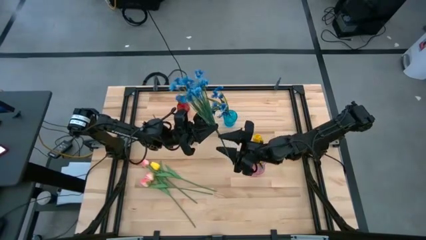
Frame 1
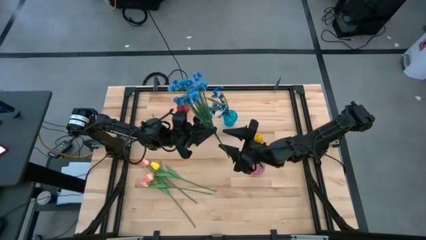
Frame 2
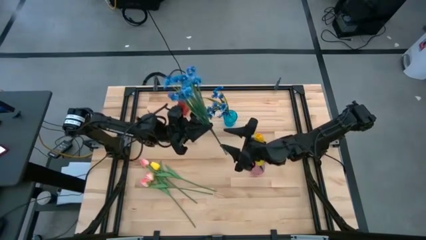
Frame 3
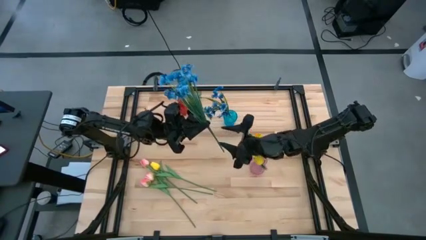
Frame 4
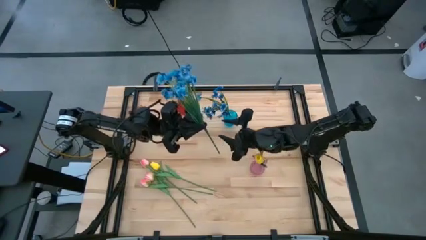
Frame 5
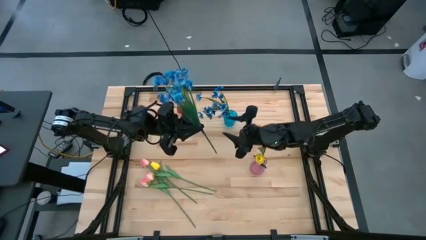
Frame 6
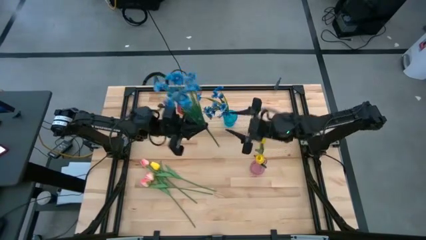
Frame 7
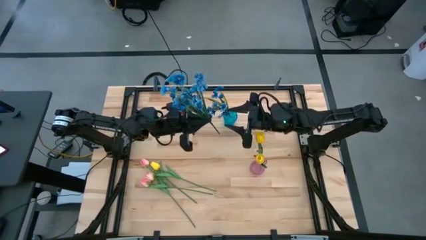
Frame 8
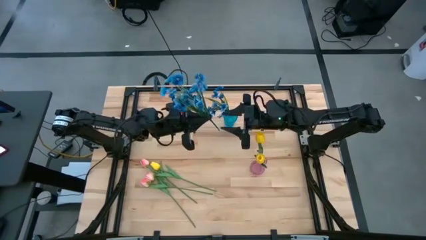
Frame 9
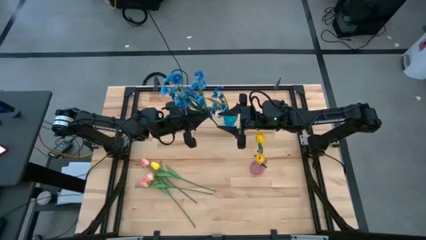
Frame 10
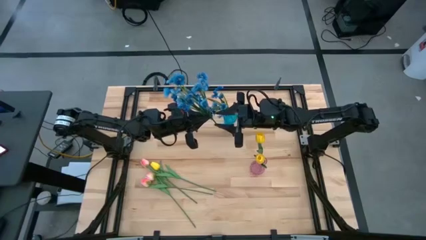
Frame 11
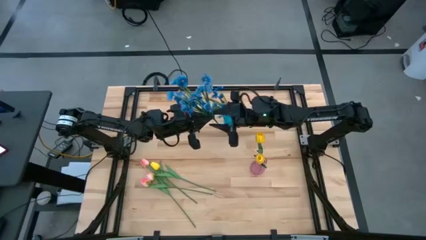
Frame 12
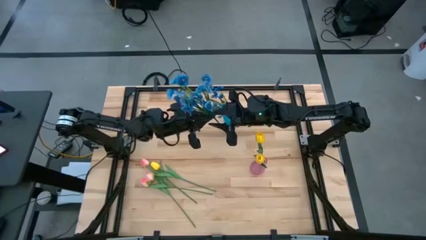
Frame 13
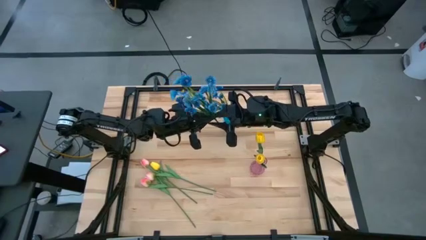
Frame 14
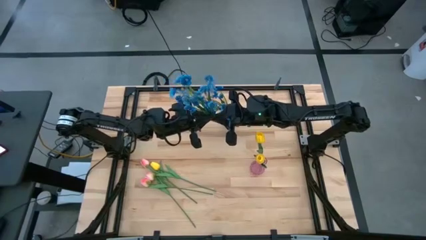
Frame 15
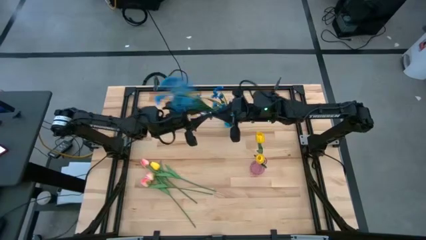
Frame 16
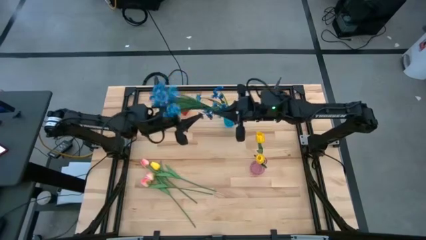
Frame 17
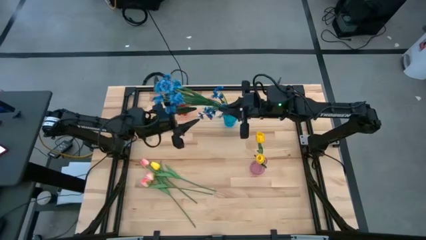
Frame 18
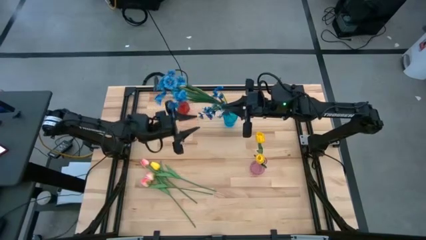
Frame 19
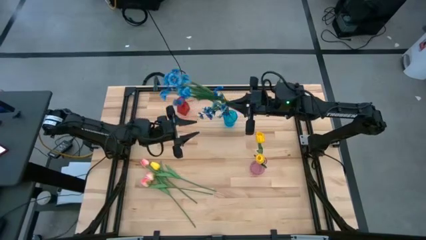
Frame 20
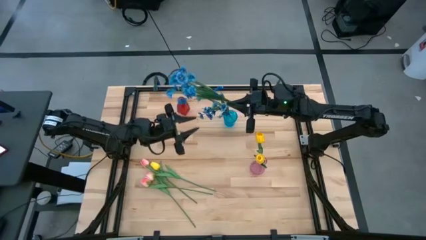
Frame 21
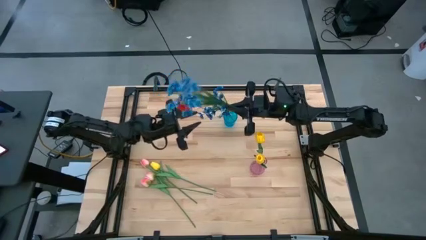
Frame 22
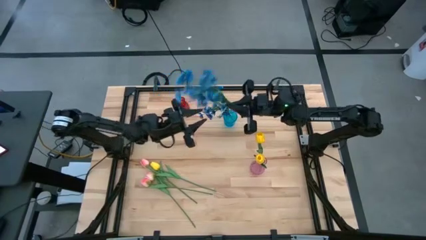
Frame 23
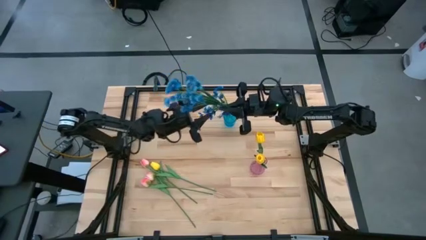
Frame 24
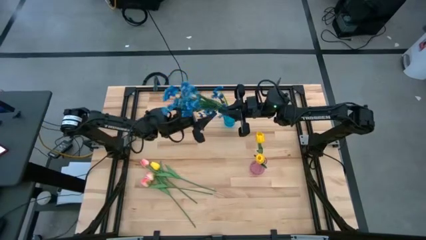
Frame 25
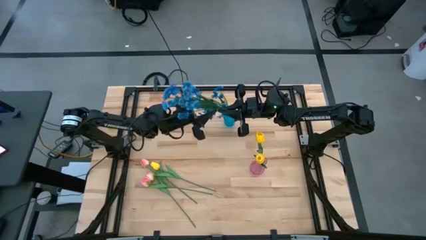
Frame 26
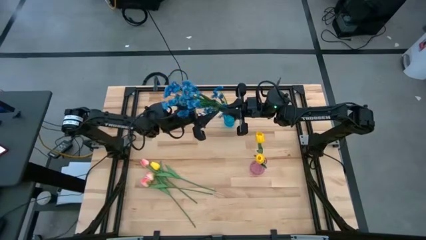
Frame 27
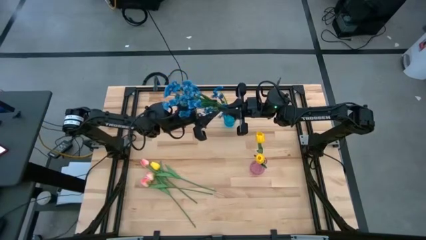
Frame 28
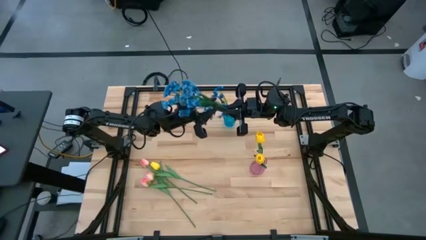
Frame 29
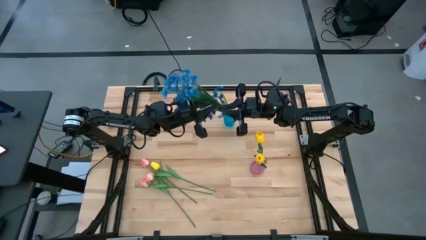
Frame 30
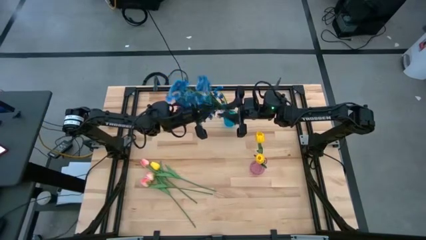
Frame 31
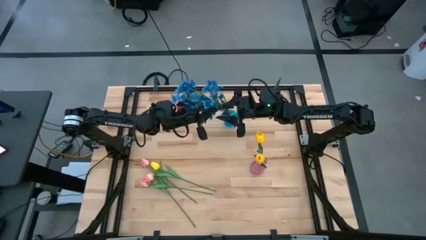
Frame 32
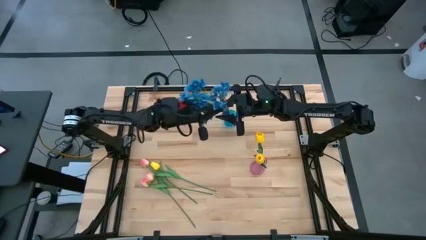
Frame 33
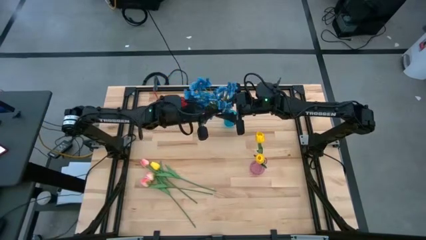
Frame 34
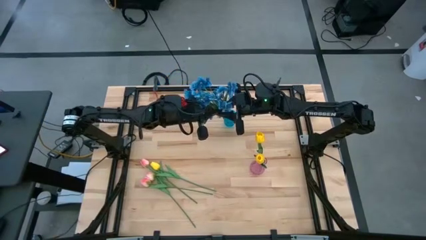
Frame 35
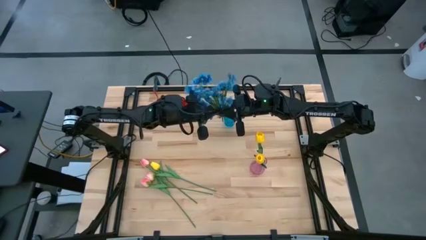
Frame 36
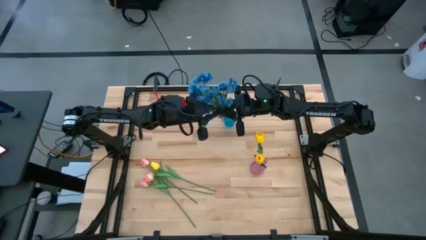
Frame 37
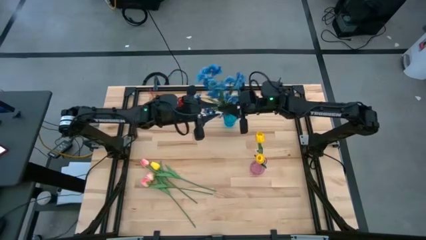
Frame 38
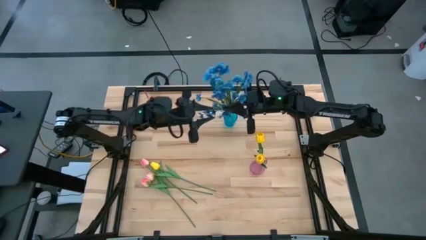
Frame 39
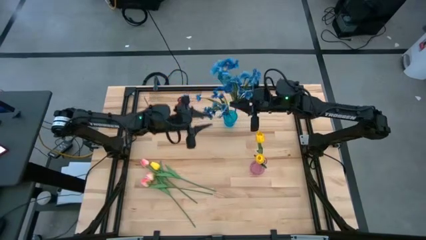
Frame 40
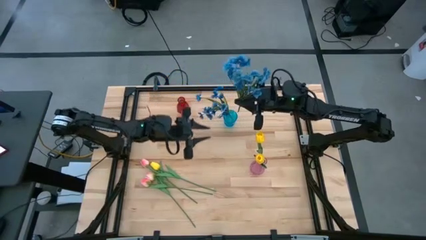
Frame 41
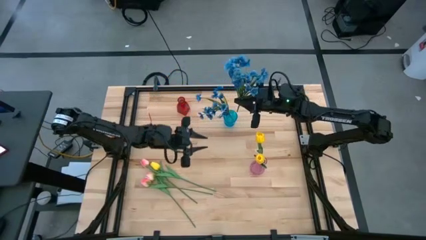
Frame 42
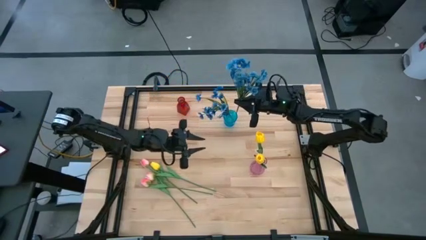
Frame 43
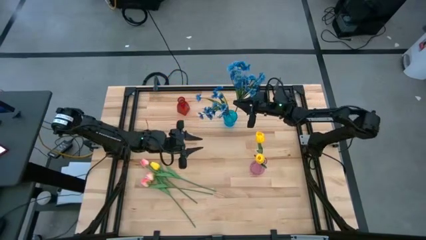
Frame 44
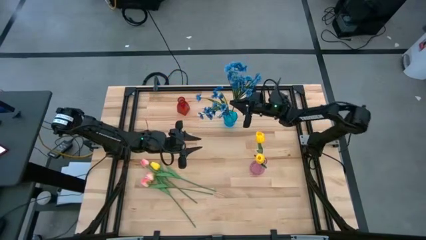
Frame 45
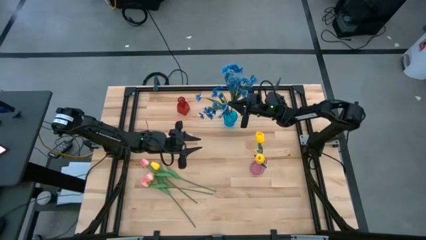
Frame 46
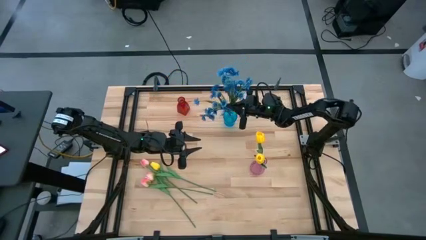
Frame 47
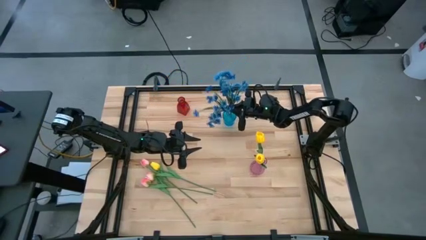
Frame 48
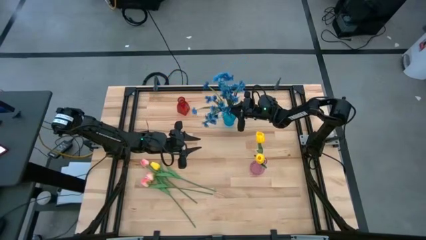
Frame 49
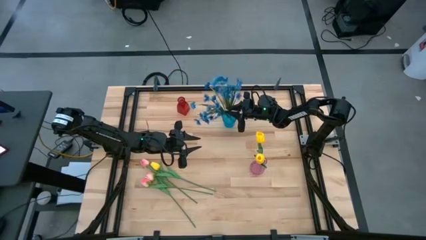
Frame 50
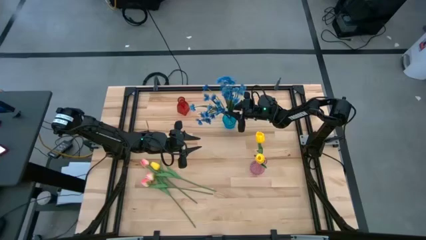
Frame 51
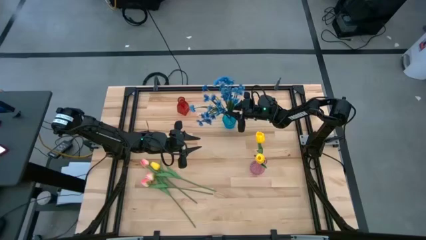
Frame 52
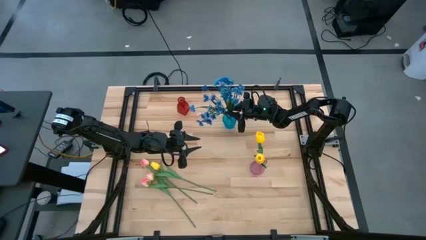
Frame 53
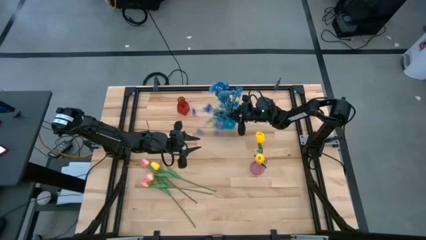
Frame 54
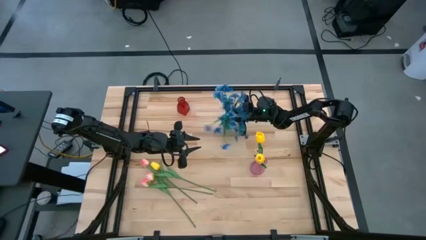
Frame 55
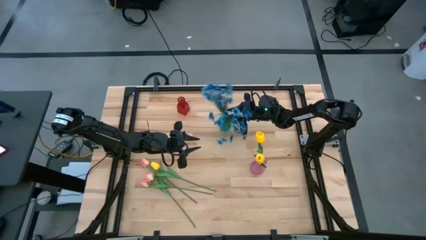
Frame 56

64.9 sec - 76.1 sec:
Task: Sort flowers into vase by color
Put the blue flower into the blue flower vase

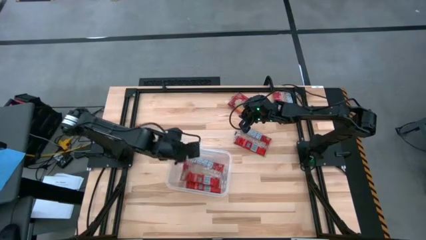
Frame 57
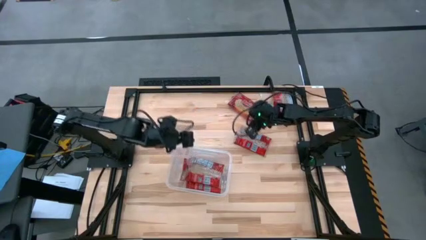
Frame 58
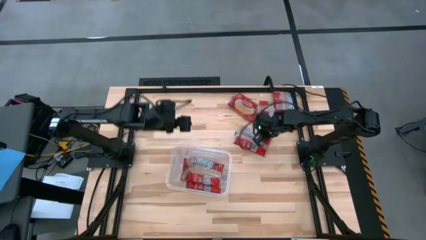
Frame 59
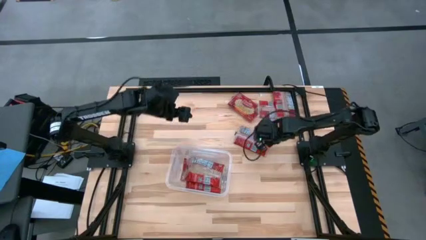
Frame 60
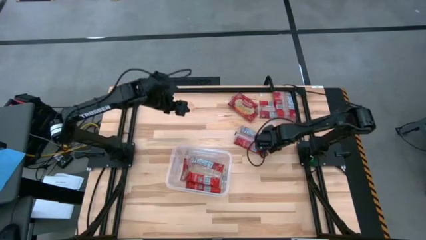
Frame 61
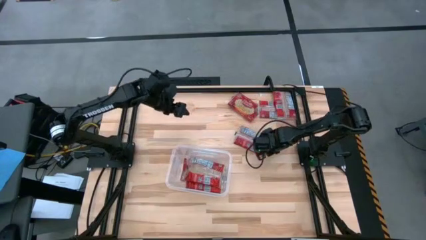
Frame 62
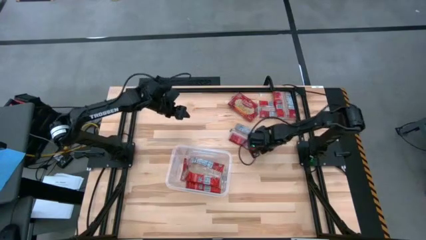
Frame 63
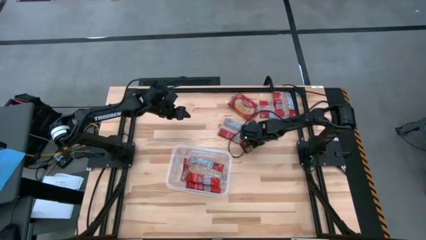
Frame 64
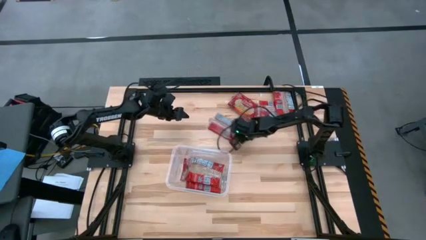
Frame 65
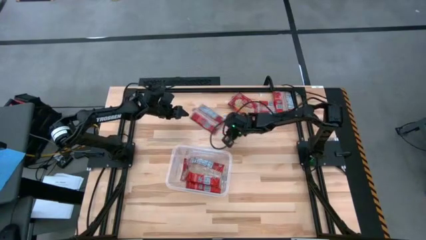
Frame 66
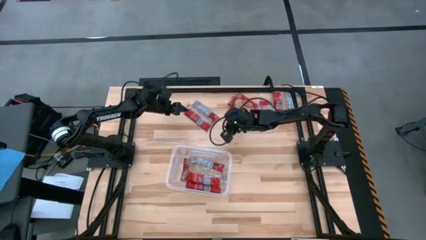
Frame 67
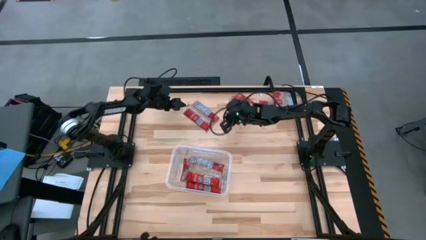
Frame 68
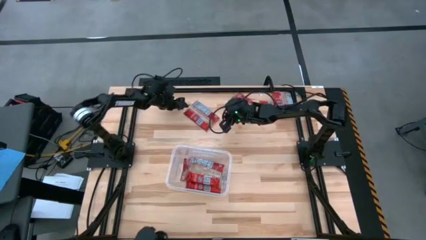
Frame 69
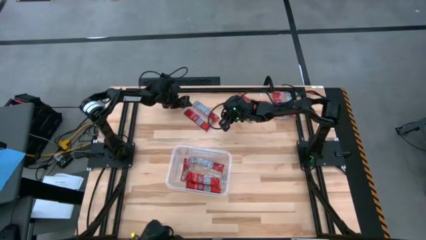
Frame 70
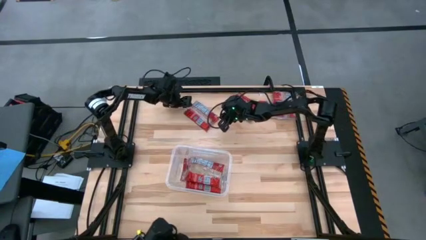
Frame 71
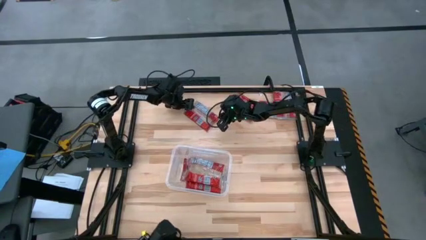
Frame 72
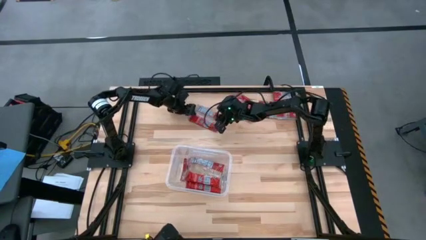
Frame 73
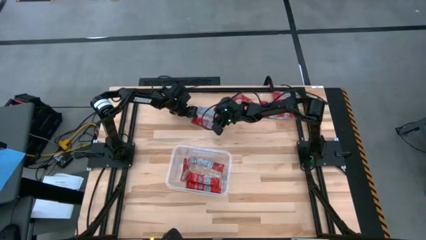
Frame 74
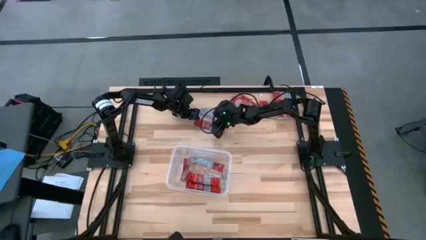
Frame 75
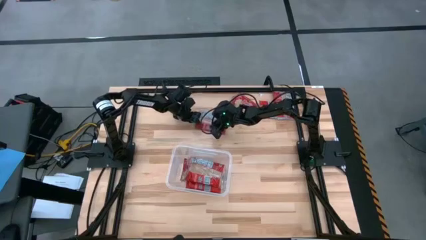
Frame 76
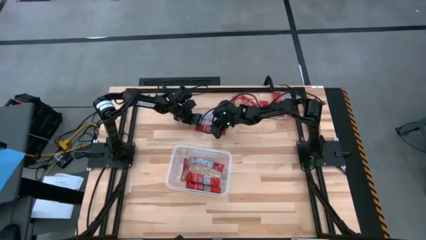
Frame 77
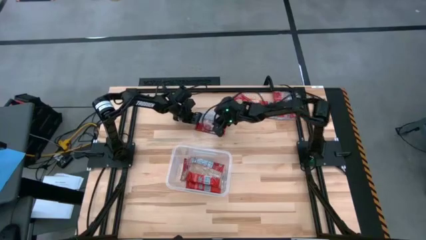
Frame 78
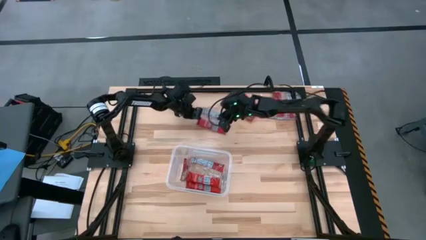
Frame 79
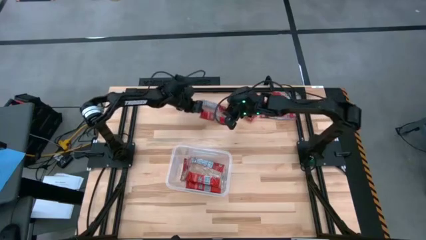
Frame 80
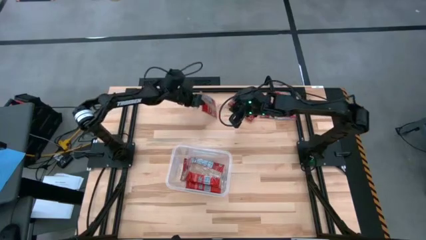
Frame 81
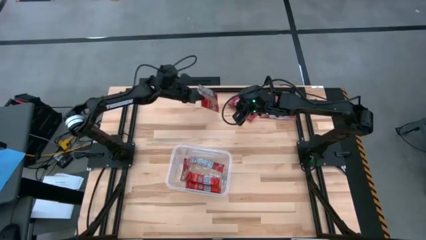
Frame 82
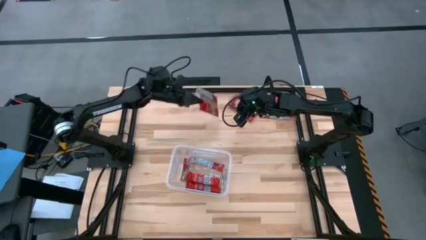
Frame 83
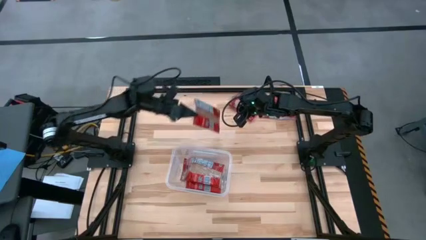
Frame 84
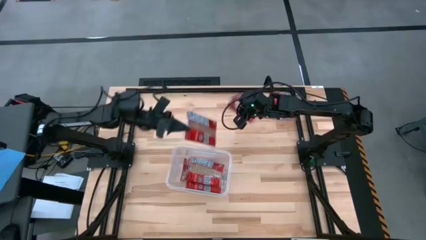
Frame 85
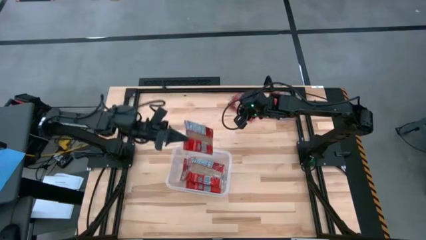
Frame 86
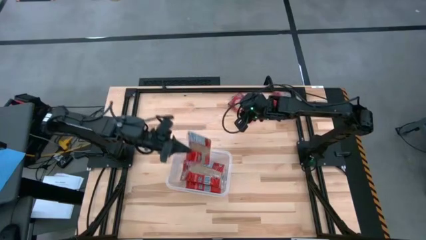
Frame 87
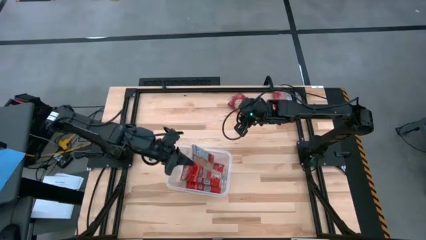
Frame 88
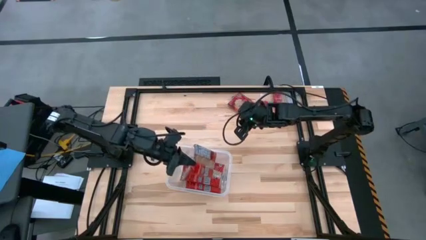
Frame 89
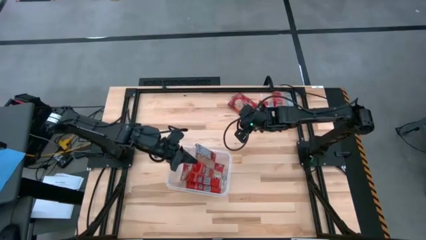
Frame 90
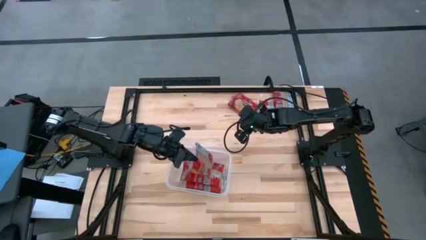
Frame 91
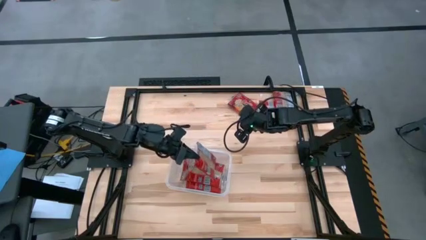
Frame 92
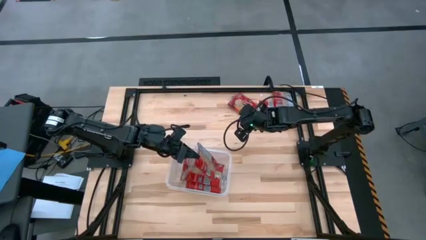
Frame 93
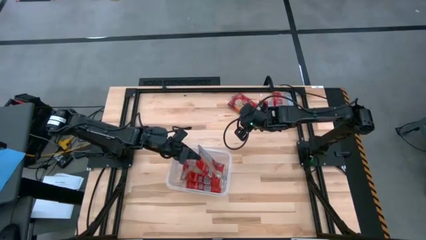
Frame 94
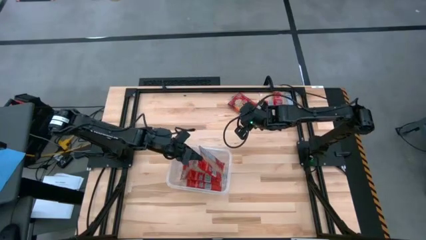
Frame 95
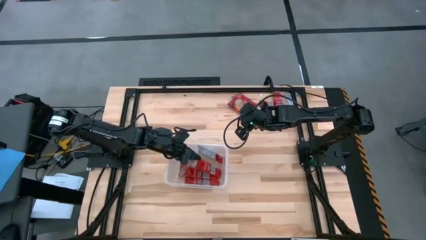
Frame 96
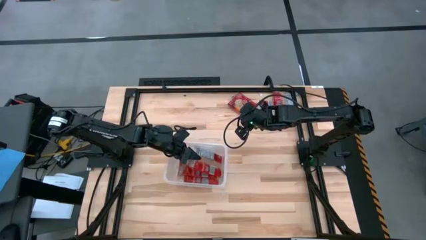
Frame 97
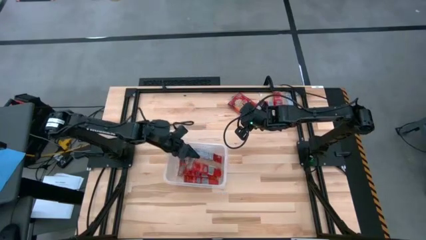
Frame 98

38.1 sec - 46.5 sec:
Task: Sort popcorn bags into baskets
Put the red popcorn bag into the container
